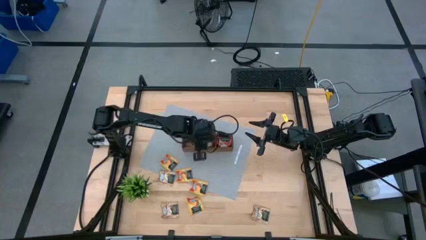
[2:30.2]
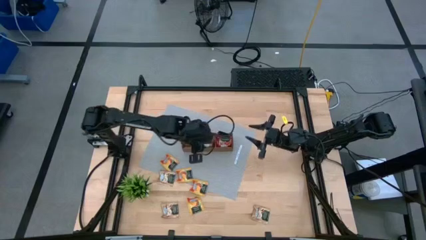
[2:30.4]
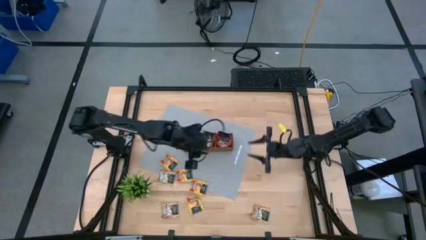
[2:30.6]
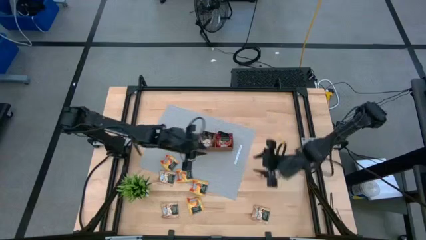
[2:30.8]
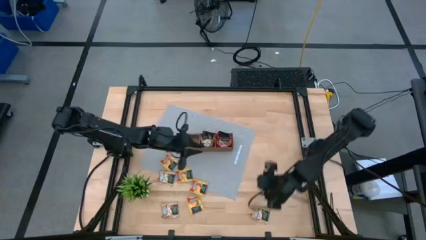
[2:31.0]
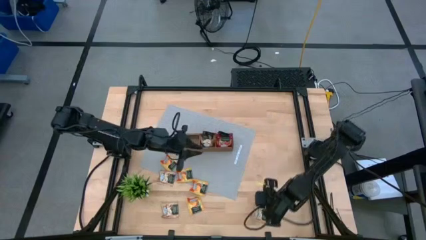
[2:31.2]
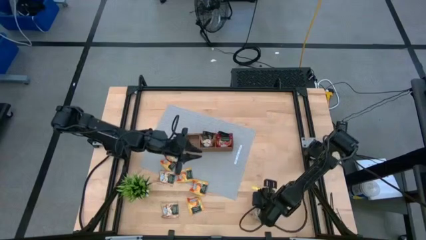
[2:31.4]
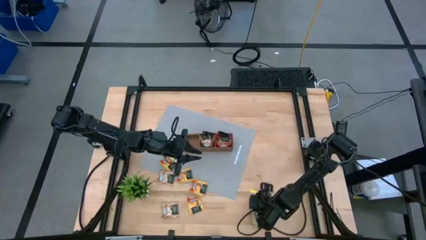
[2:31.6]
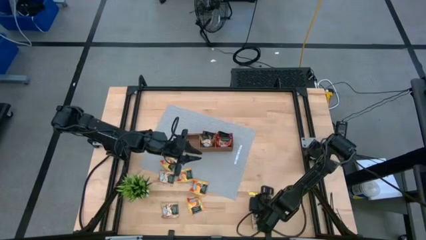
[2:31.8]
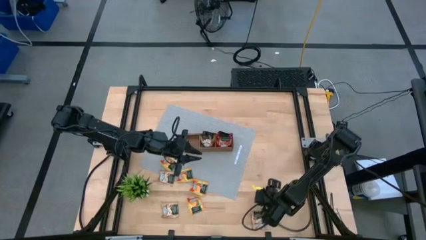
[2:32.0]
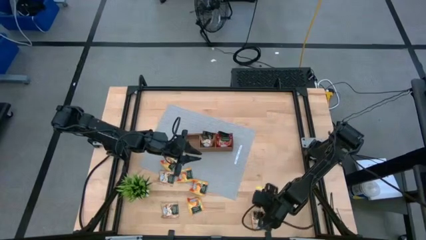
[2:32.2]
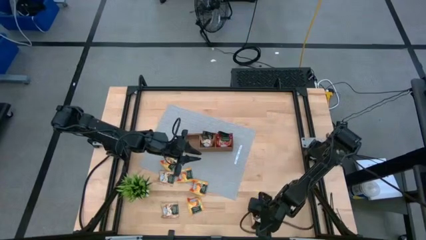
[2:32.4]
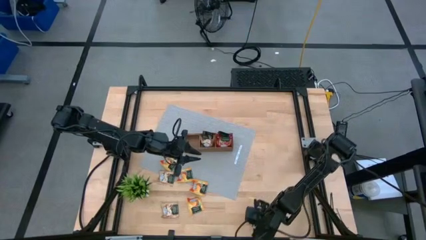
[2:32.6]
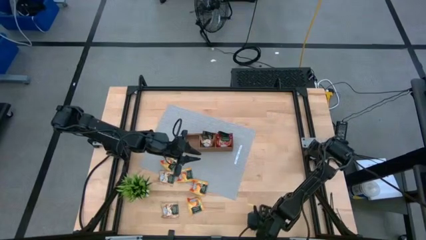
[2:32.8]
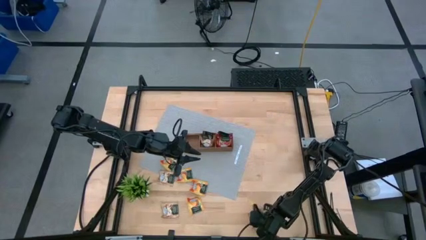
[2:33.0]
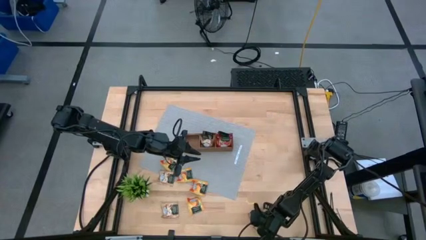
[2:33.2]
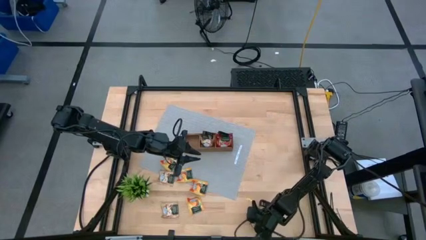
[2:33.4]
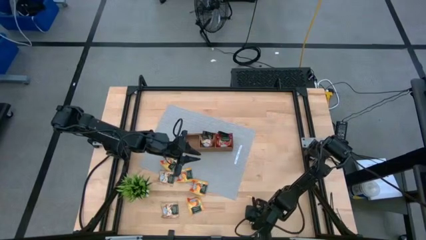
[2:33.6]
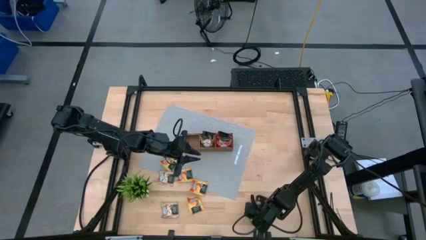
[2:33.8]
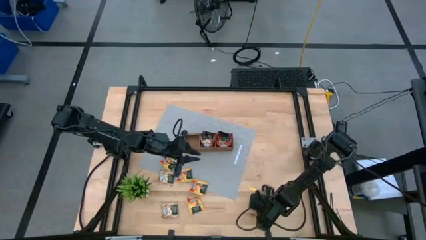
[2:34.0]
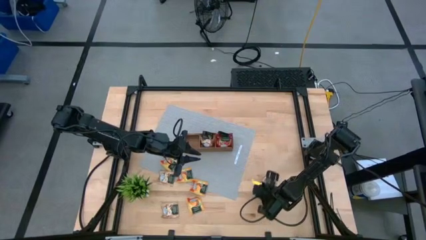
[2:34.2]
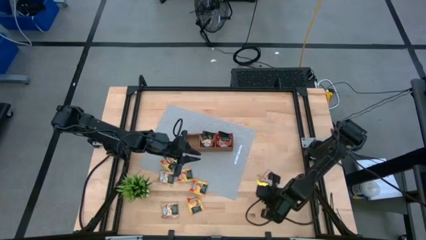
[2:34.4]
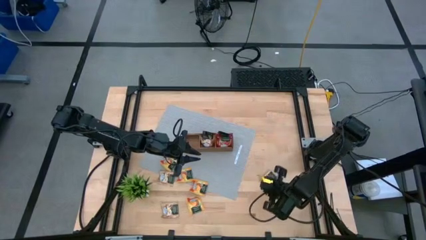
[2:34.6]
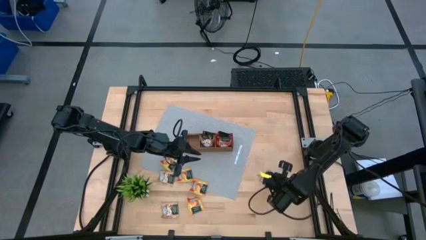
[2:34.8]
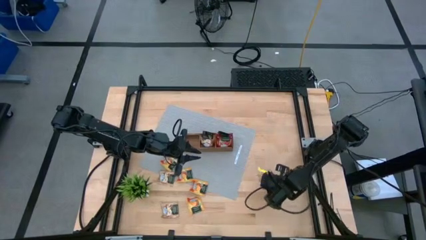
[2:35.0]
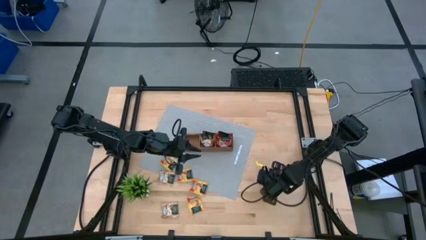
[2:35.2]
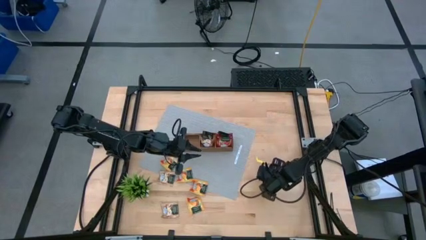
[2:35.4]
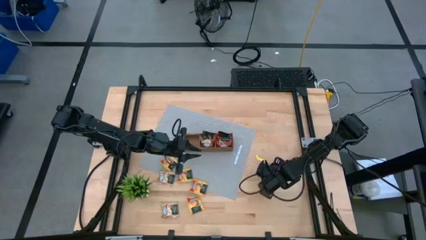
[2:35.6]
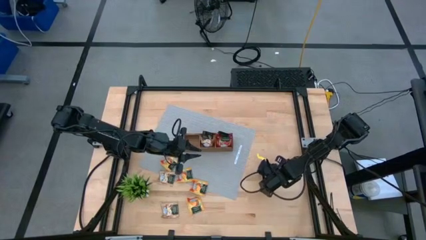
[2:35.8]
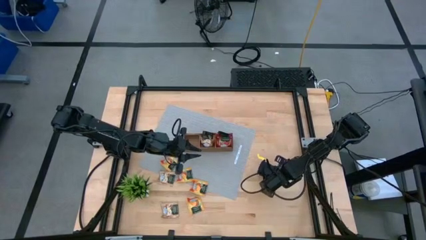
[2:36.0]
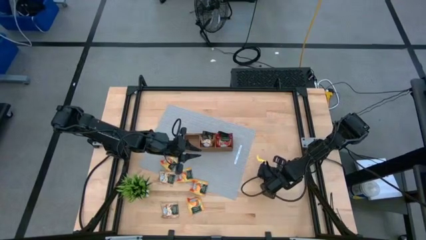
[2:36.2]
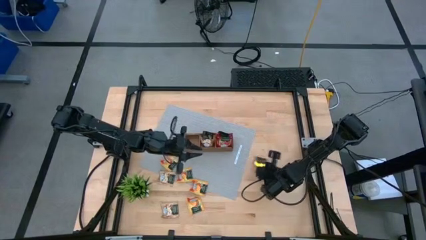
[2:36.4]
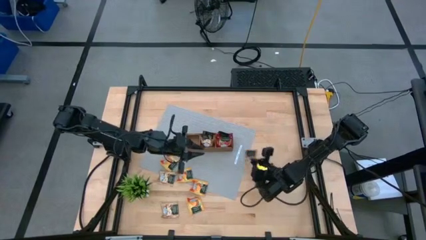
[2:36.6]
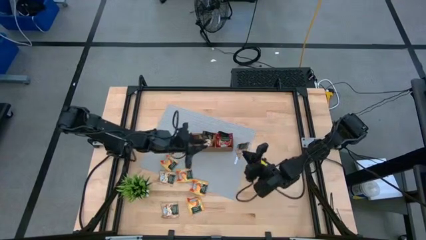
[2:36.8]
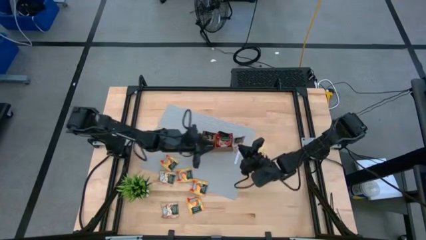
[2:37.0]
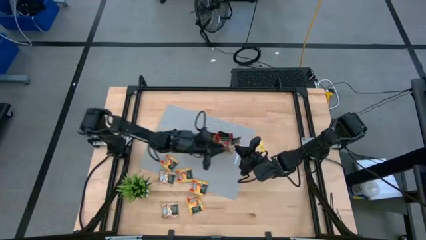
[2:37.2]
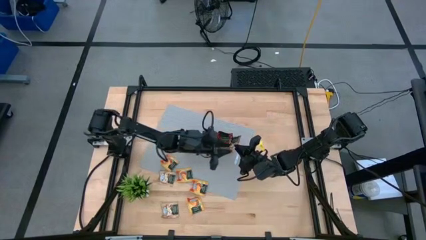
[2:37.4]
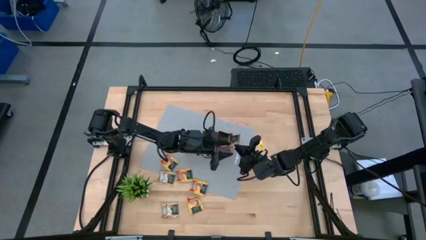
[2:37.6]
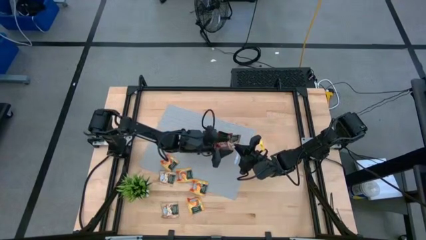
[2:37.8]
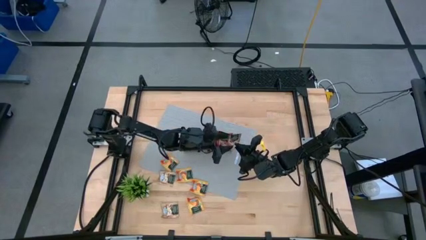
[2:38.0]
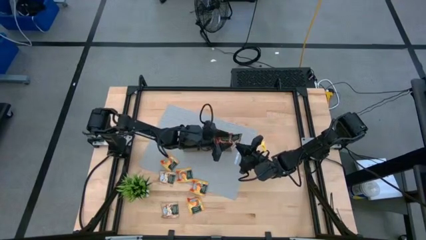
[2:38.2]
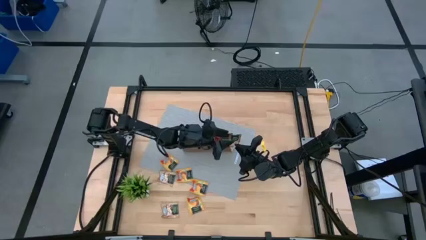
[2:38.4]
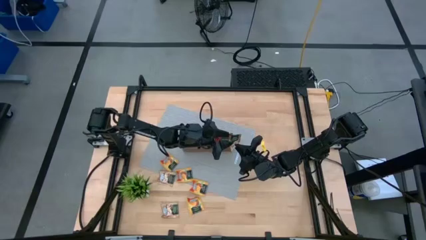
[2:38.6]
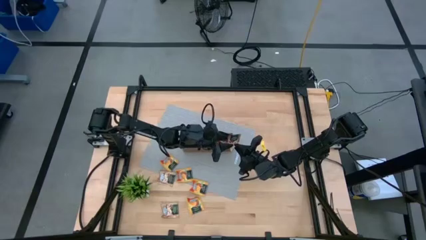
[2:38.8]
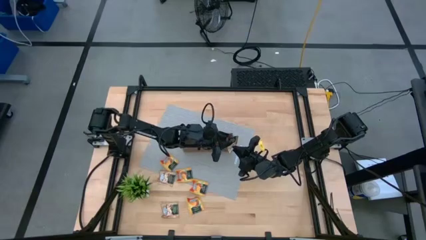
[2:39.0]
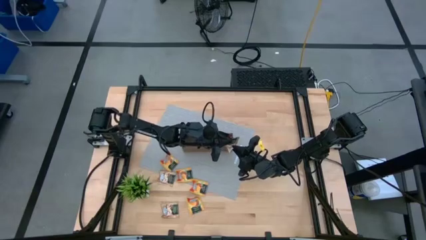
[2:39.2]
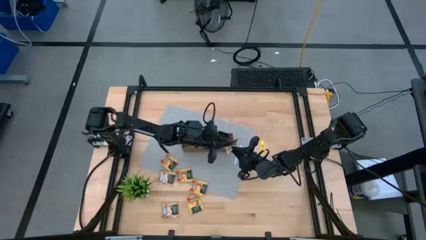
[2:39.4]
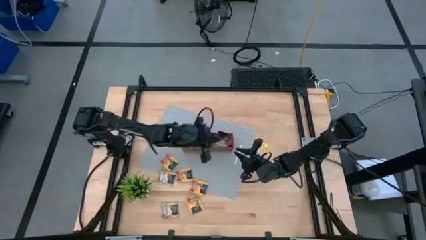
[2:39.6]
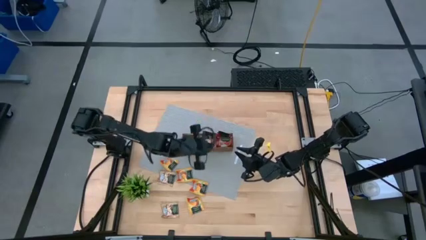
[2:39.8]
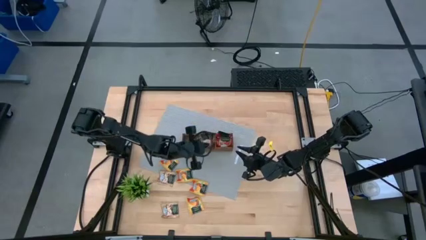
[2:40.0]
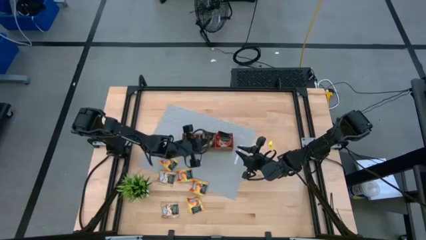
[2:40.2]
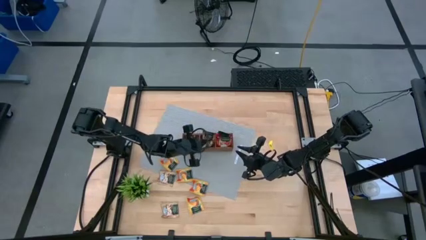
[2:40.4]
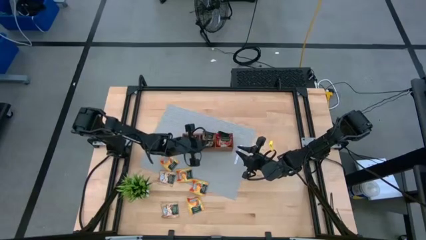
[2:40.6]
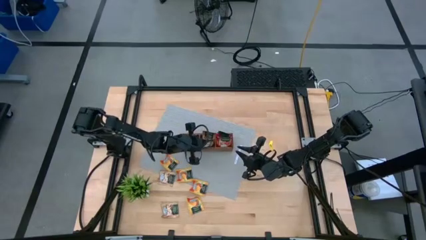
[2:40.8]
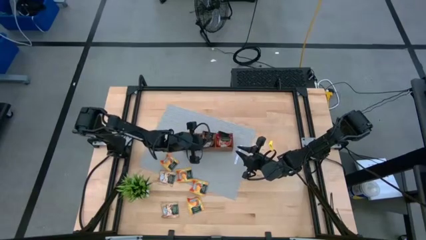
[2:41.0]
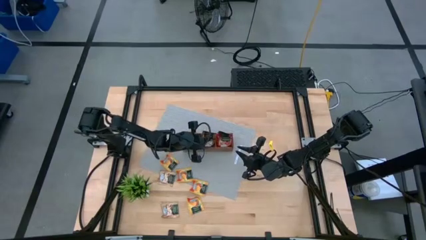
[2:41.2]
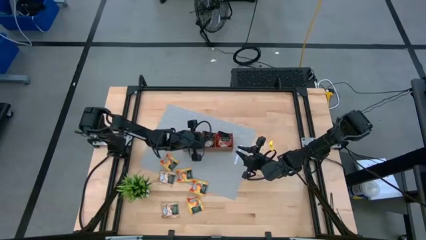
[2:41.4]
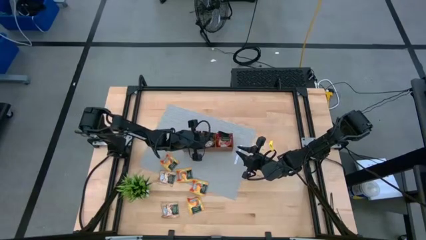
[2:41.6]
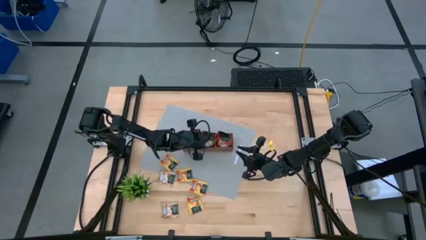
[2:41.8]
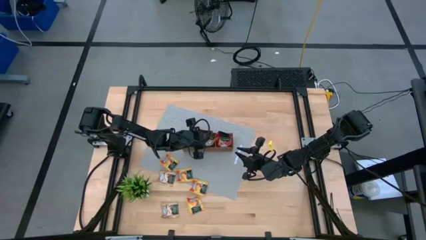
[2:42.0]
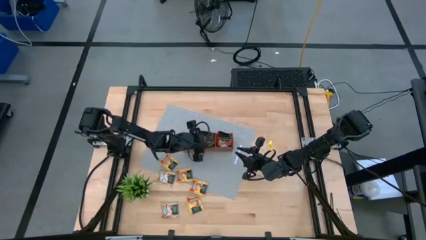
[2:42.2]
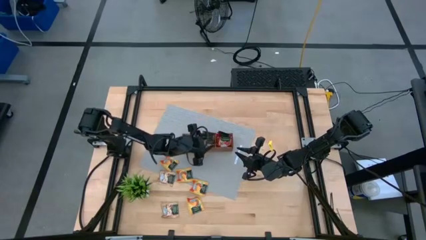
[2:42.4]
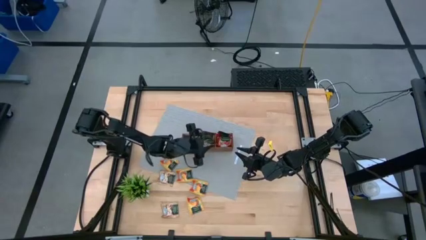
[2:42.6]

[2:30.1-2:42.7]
Task: Pick & Place Tea
Put the brown tea bag into the wooden organizer

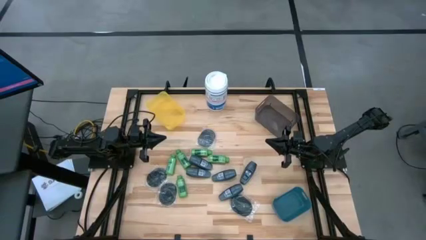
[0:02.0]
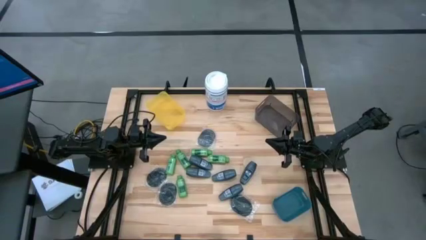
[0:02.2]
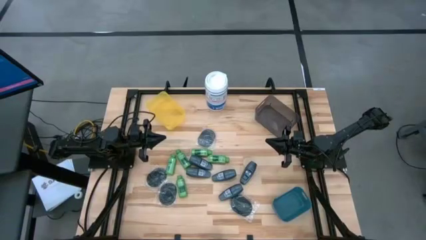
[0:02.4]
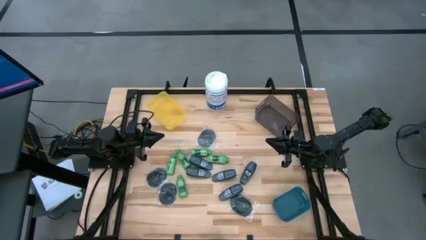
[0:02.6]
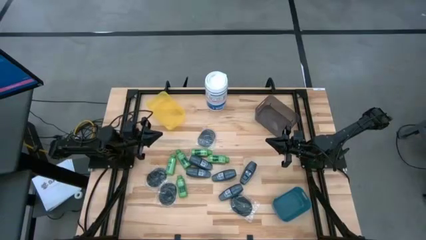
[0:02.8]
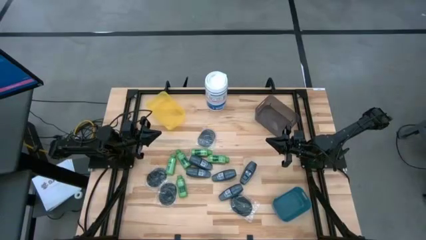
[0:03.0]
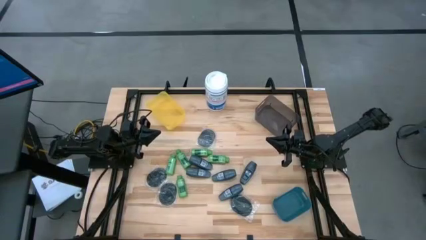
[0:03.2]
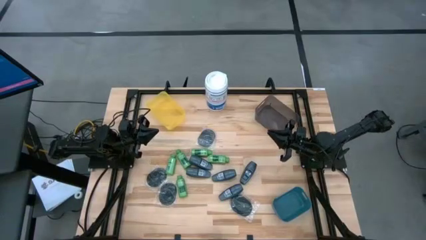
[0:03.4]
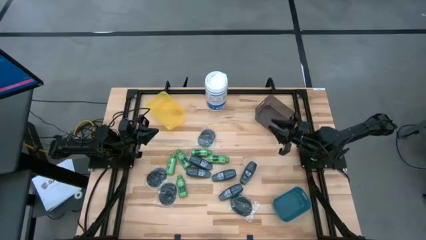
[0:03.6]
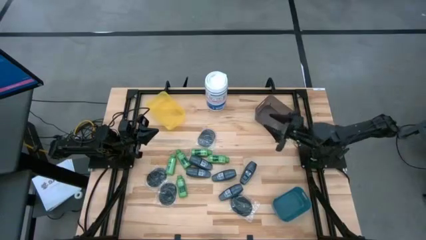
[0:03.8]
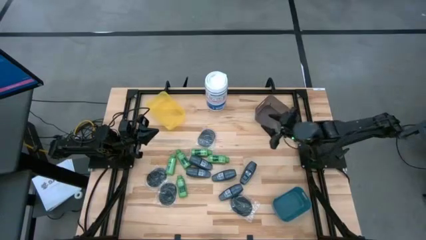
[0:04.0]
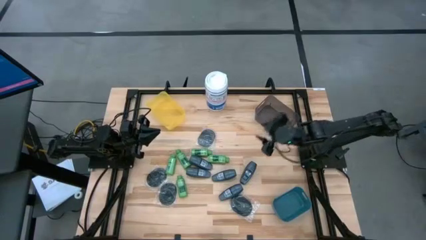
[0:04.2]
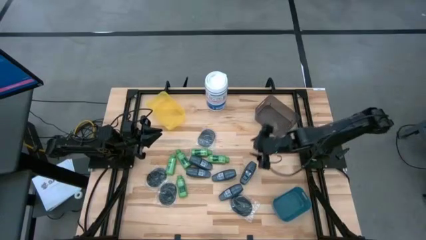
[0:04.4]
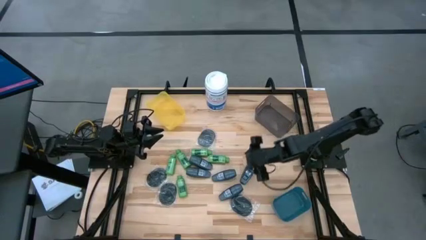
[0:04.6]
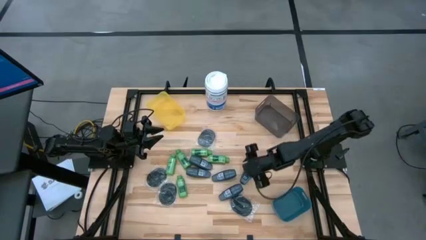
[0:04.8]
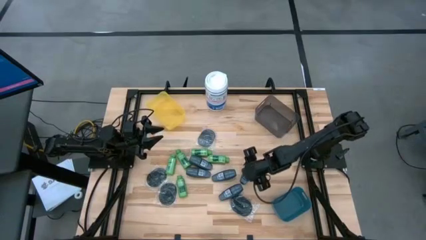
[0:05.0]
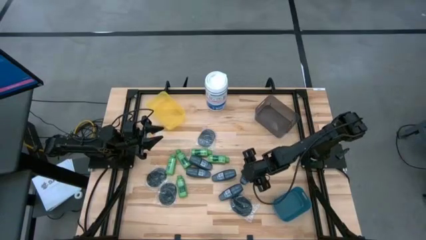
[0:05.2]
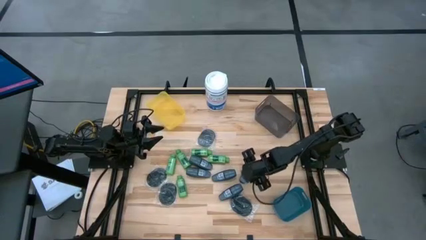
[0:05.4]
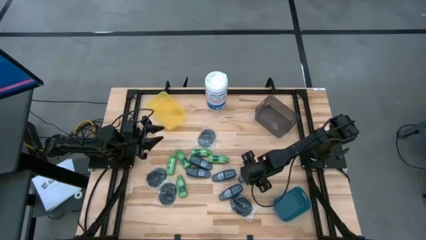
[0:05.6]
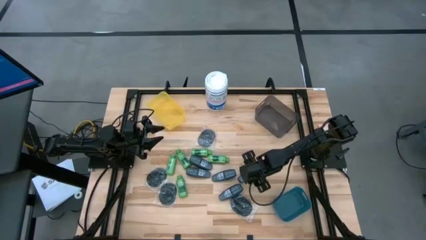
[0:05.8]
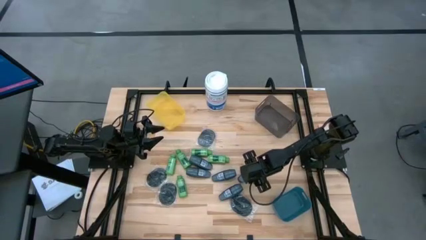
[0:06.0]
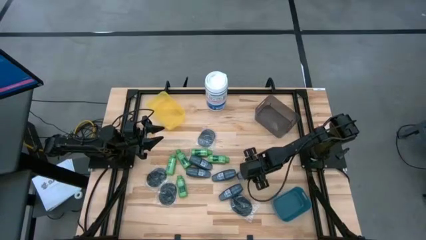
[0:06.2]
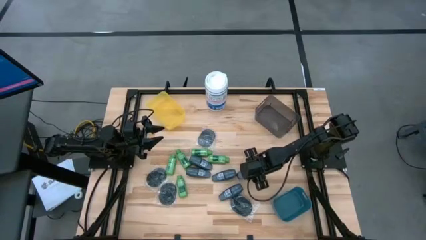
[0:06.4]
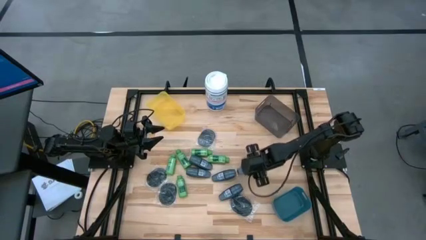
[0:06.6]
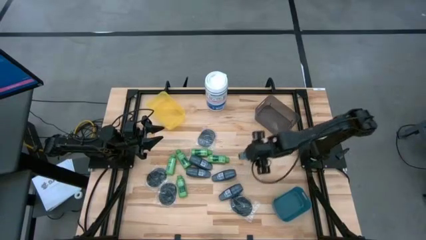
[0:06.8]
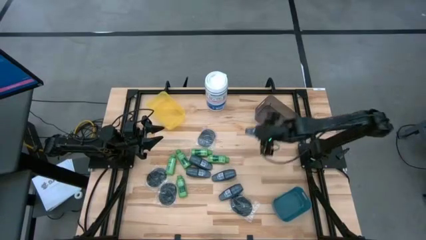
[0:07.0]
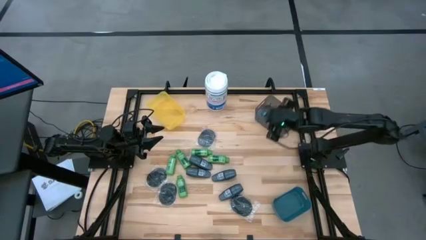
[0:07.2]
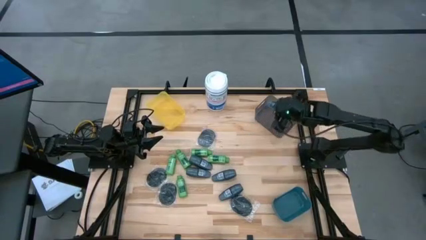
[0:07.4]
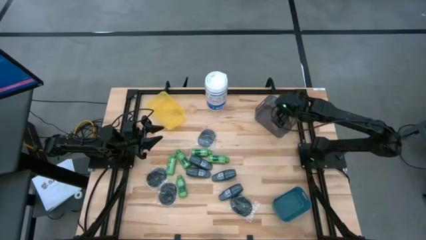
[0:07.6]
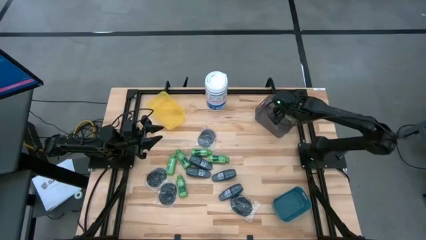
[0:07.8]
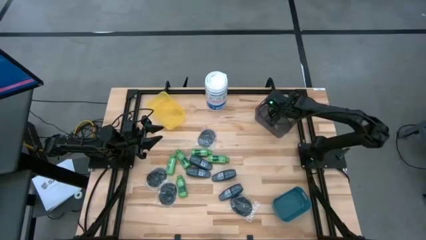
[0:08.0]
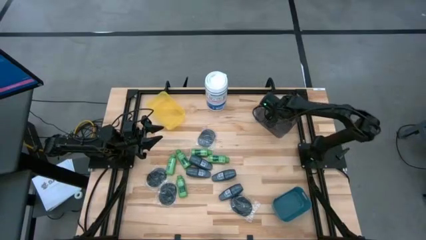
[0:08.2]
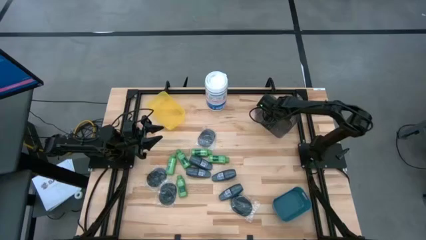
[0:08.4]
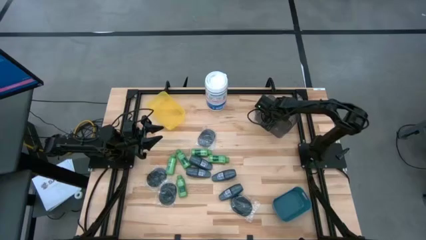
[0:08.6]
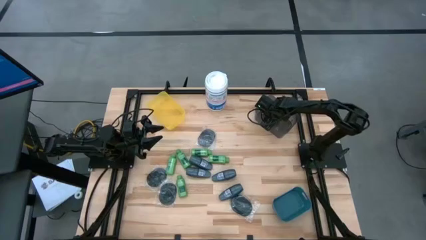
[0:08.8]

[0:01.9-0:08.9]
Task: Pick & Place Travel size toiletries
Put the gray deodorant into the black bin
